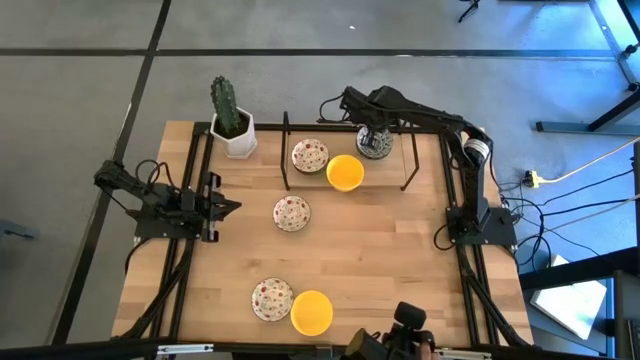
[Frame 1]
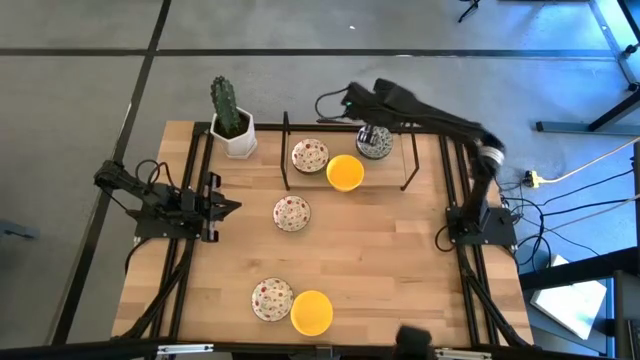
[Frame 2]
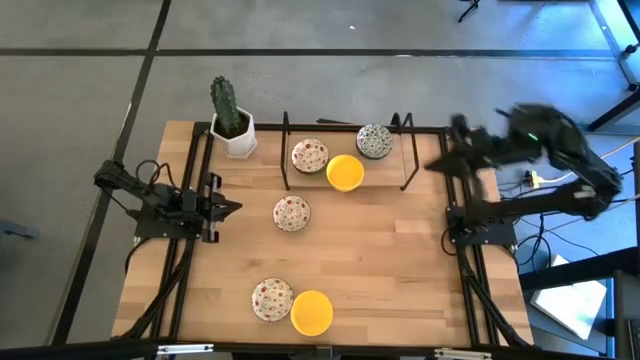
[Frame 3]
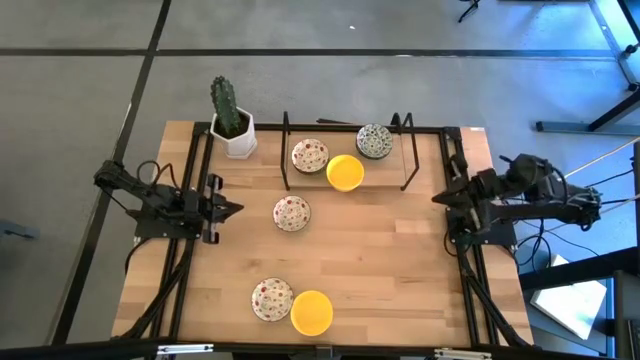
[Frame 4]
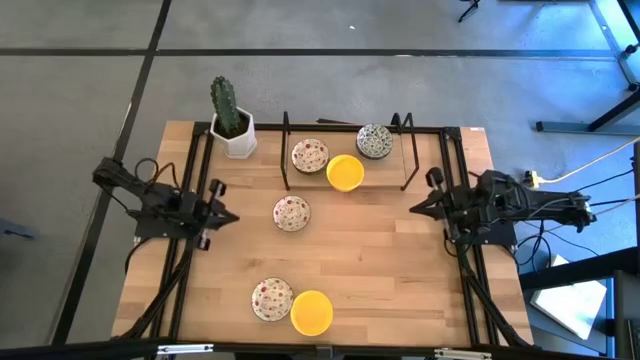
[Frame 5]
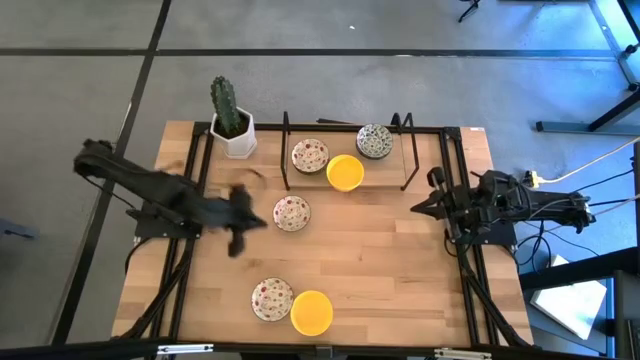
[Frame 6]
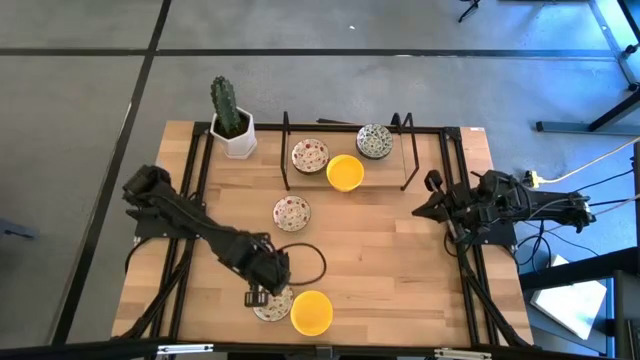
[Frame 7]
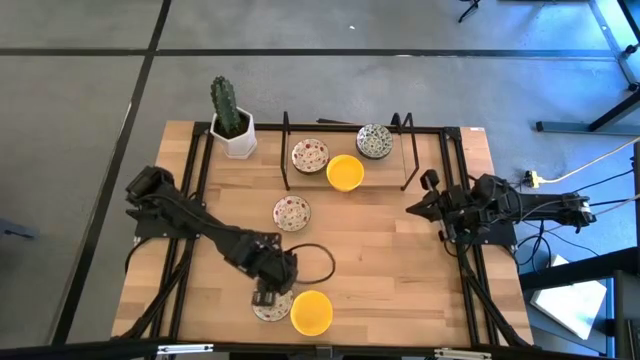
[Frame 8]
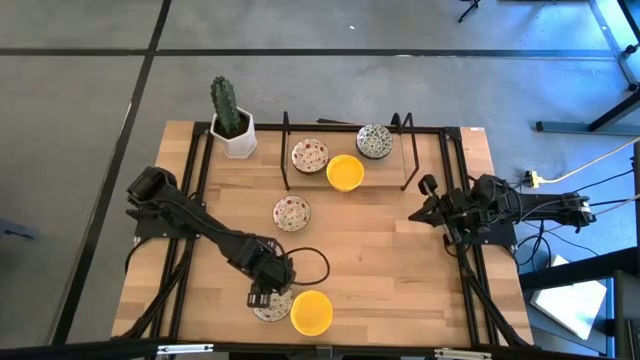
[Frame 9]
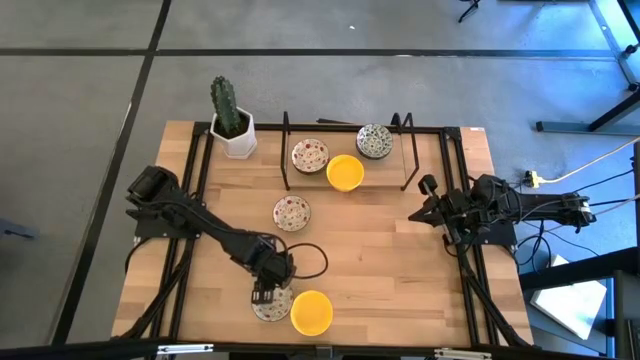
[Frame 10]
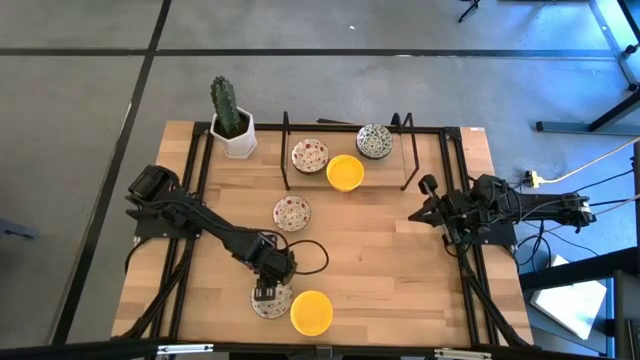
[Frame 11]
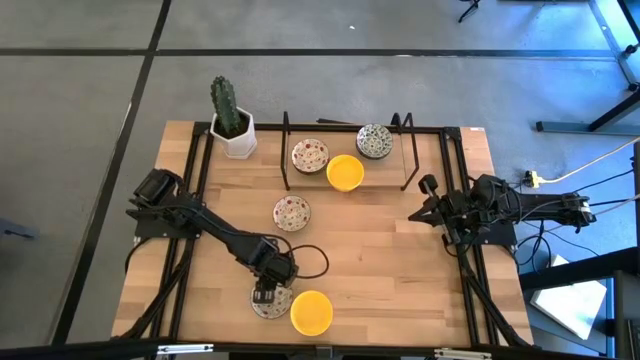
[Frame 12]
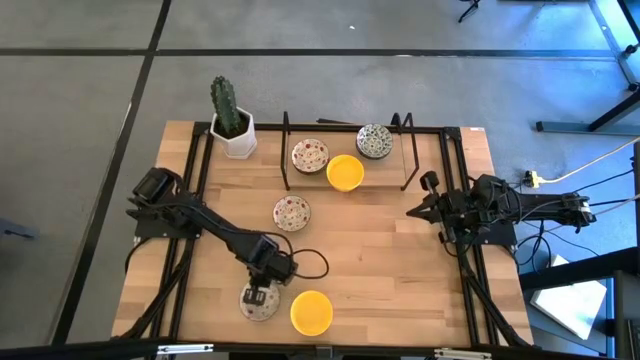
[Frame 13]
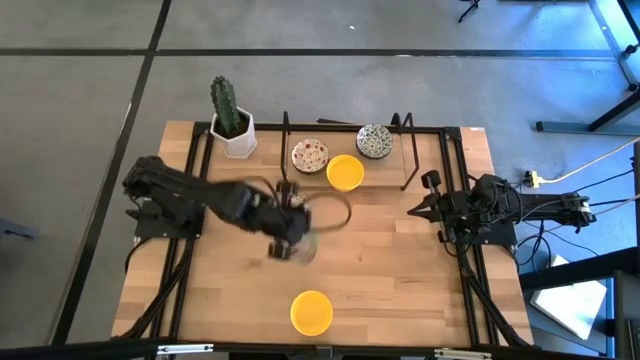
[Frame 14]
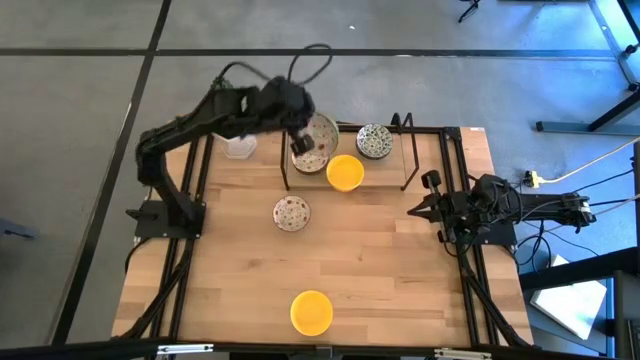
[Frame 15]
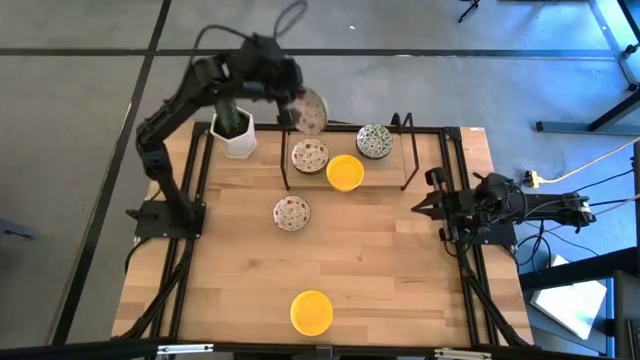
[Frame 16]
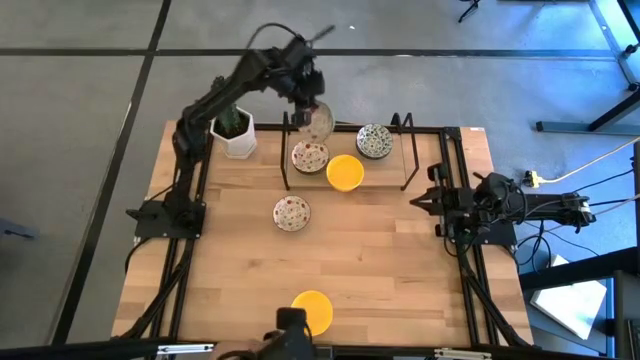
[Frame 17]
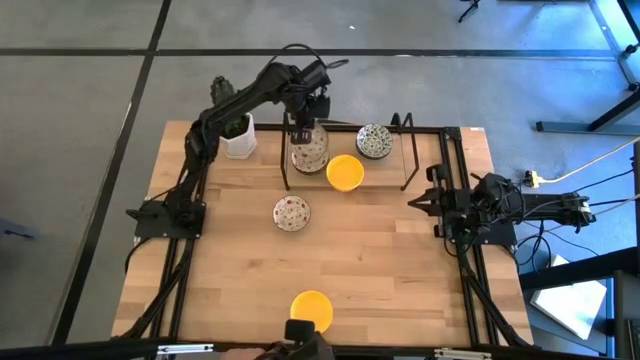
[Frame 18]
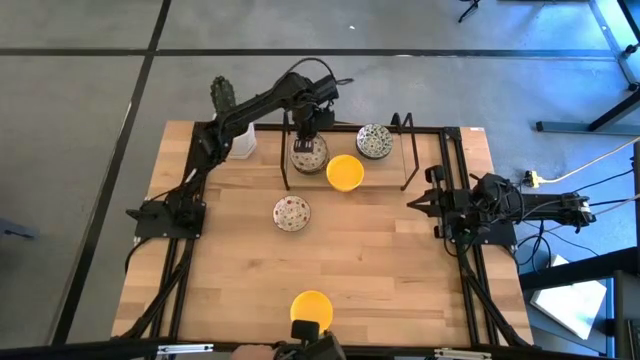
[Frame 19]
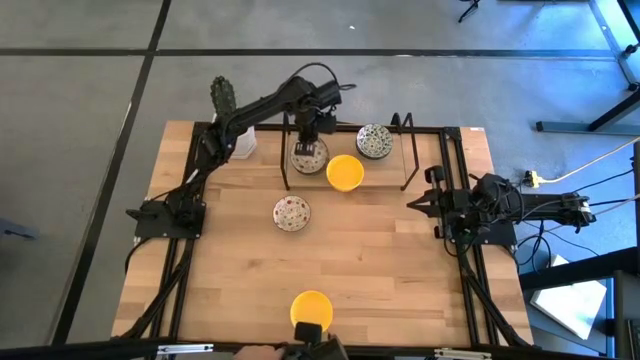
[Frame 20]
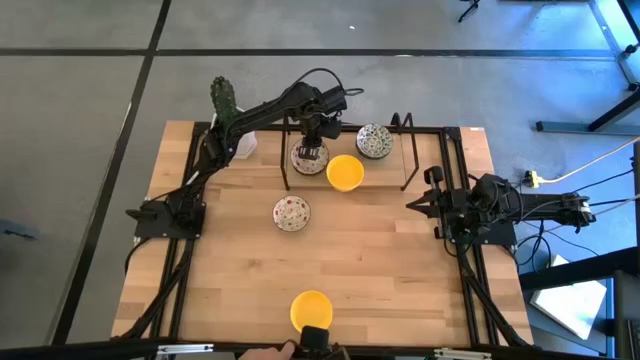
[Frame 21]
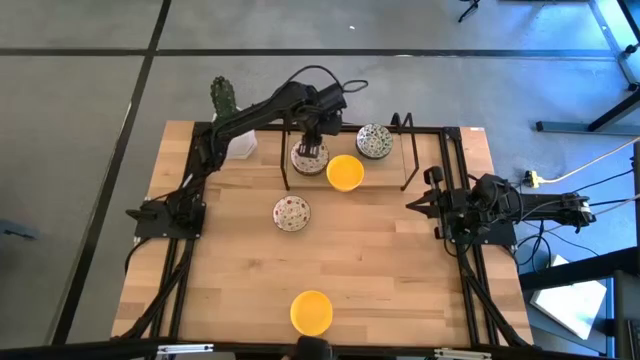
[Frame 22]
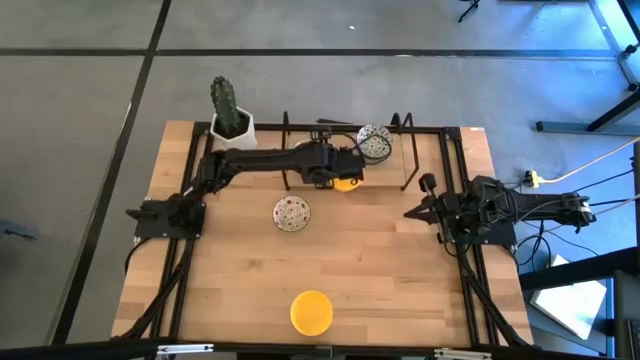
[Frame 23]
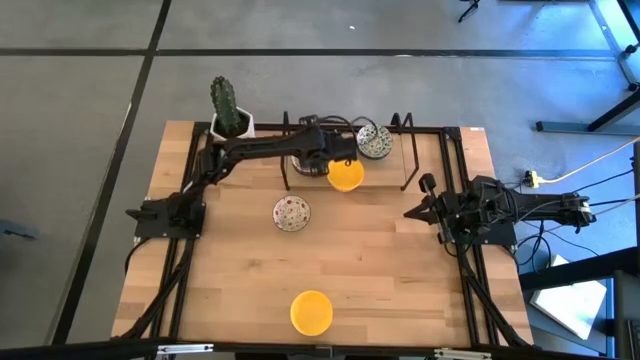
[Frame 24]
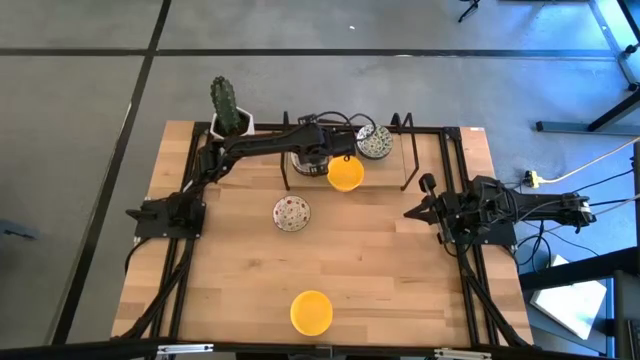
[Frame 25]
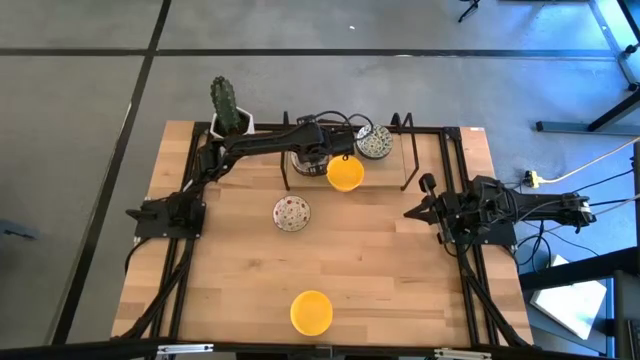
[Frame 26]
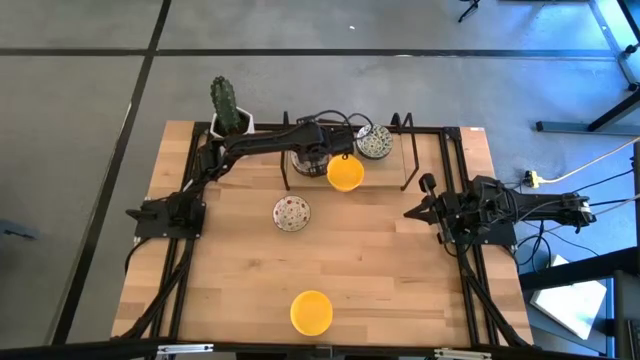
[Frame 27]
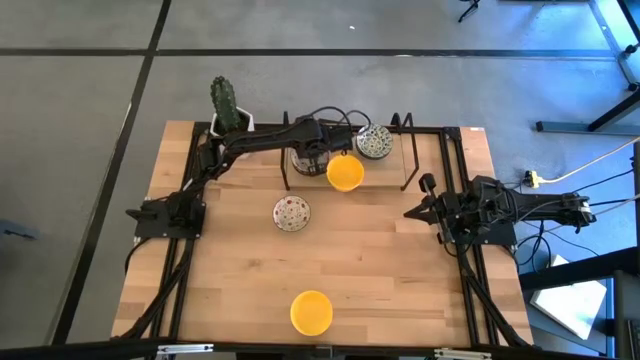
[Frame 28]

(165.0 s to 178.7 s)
Task: Pick & Place Mini bowls
Stack the green patterned bowl on the green patterned bowls on the shelf

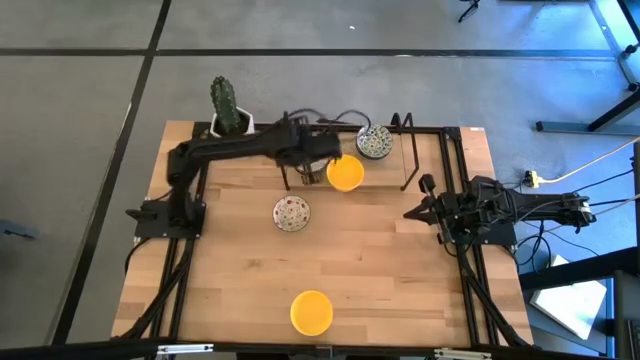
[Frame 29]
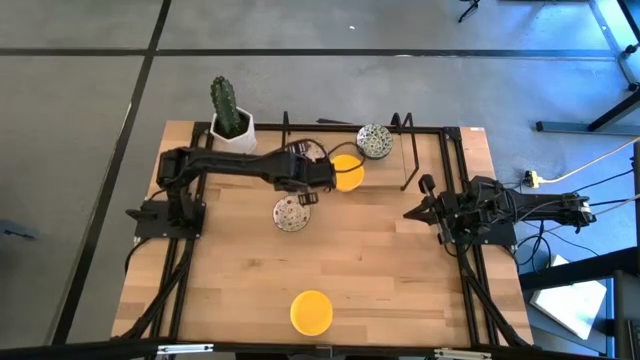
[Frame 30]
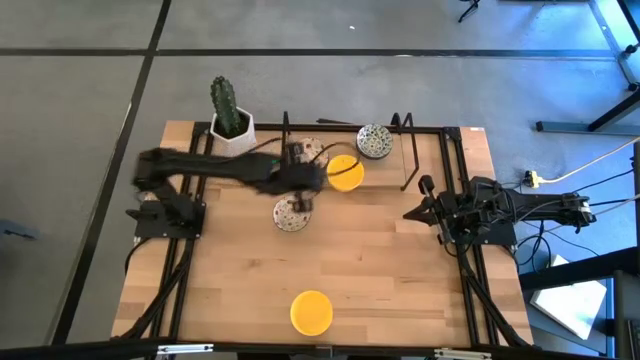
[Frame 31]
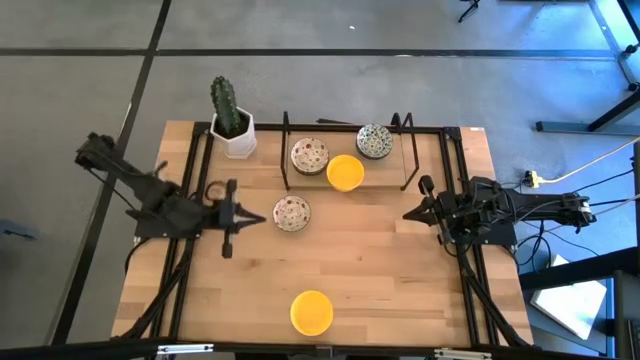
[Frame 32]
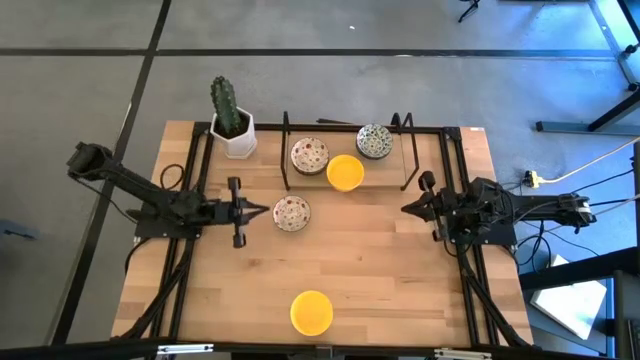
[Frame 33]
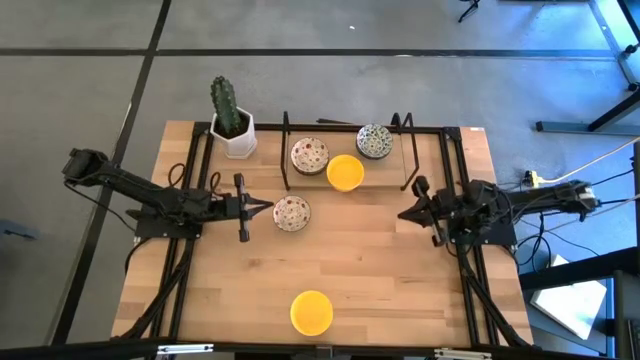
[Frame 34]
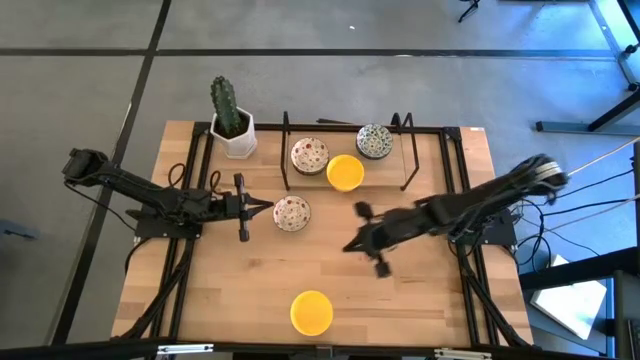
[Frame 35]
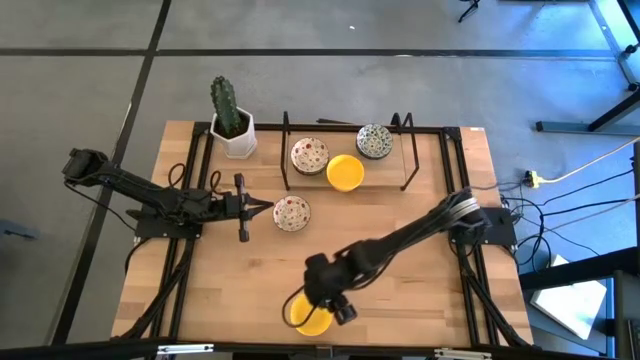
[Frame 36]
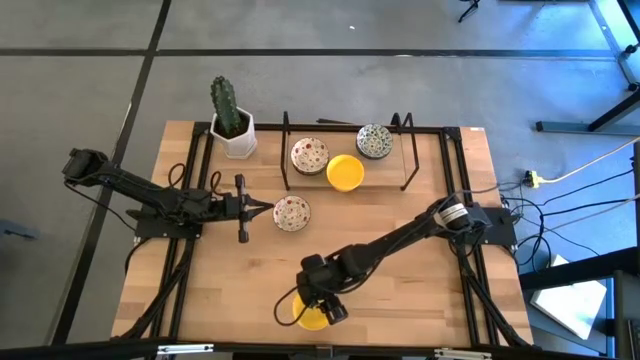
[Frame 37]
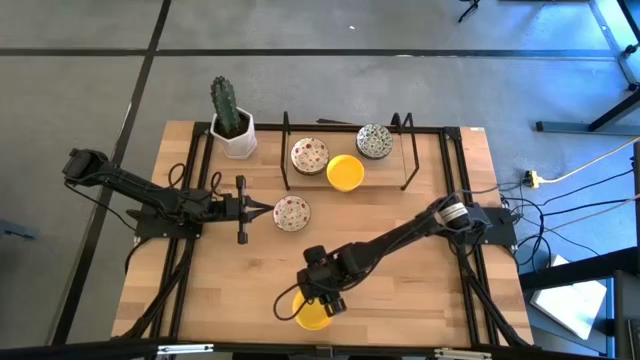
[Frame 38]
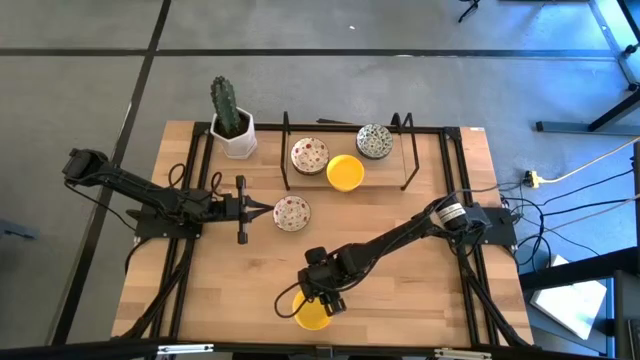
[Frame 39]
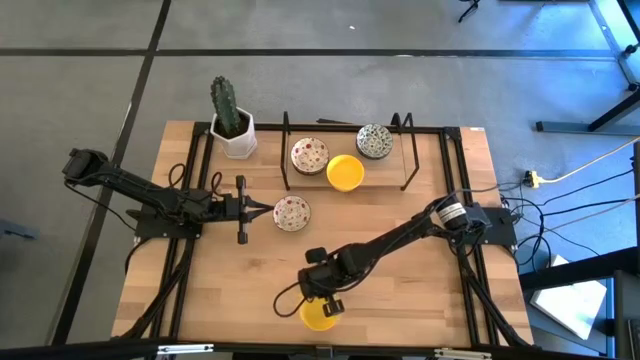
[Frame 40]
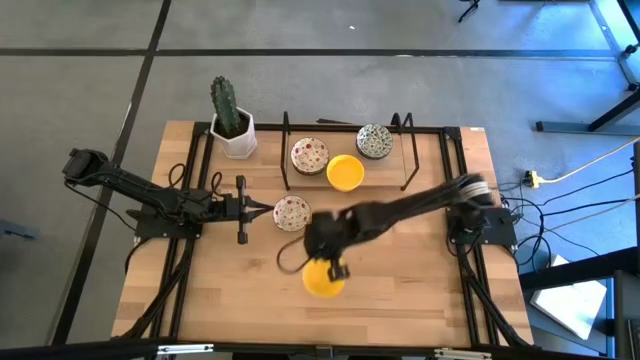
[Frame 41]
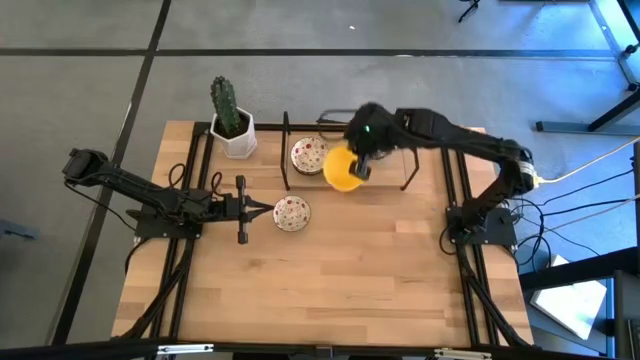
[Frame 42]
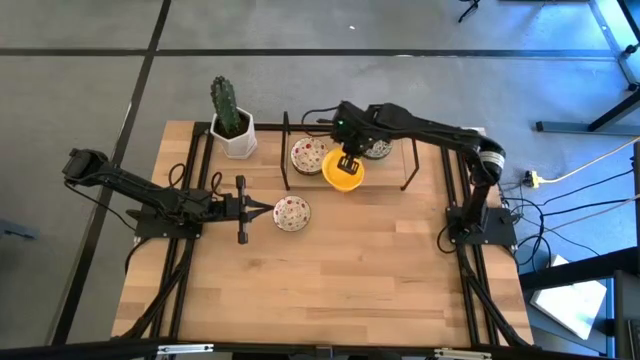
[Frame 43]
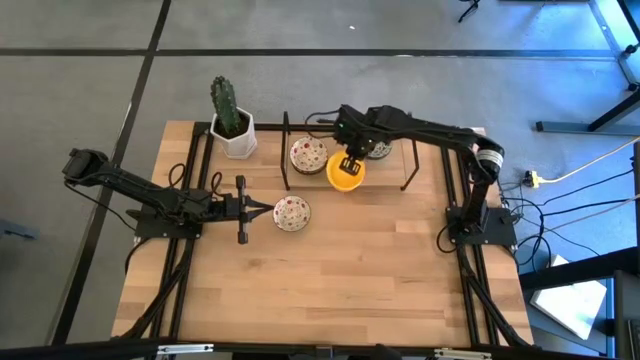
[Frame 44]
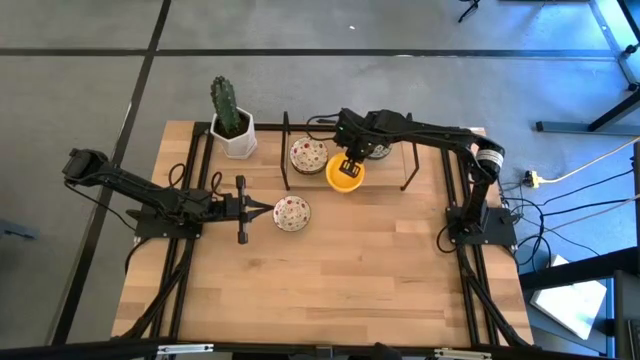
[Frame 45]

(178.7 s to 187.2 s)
Stack the yellow bowl on the yellow bowls on the shelf
